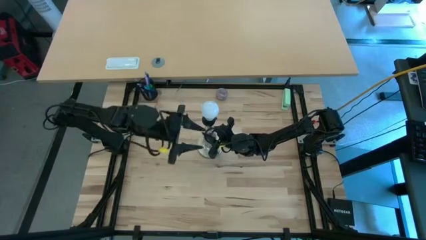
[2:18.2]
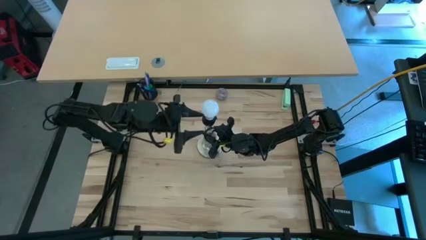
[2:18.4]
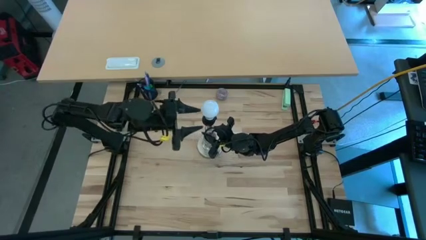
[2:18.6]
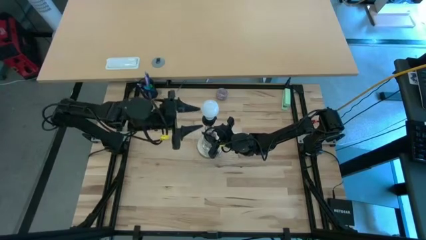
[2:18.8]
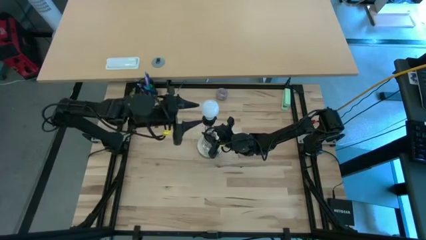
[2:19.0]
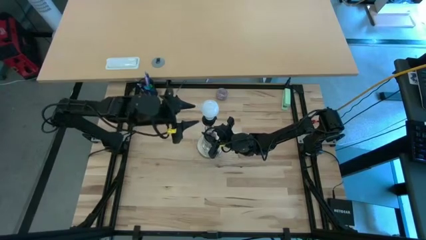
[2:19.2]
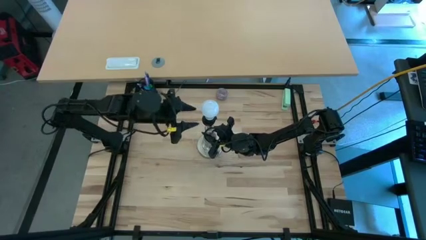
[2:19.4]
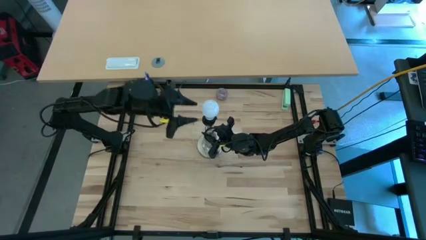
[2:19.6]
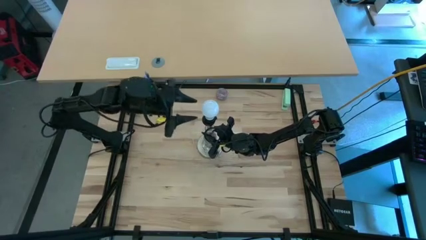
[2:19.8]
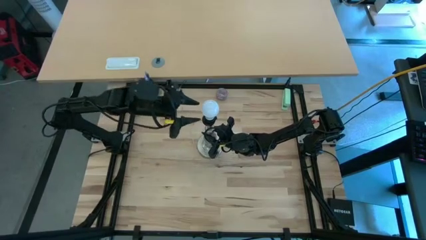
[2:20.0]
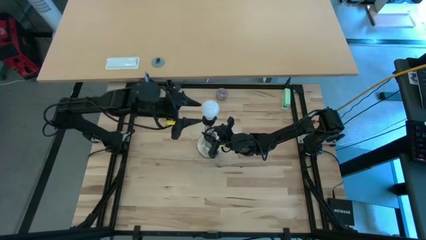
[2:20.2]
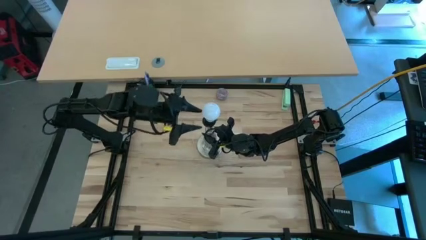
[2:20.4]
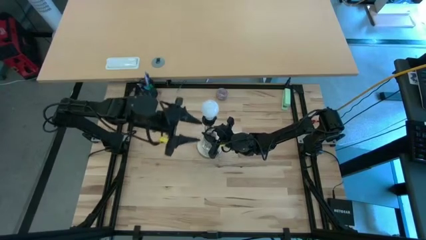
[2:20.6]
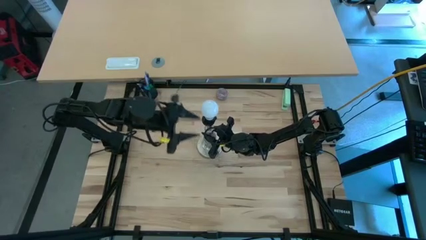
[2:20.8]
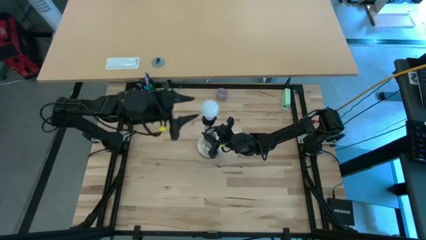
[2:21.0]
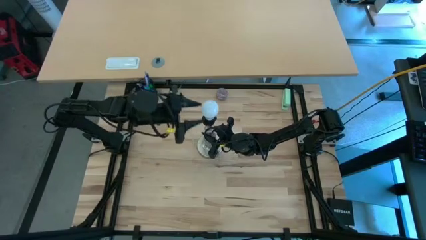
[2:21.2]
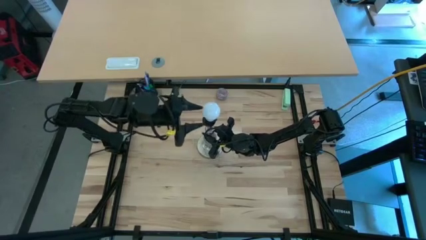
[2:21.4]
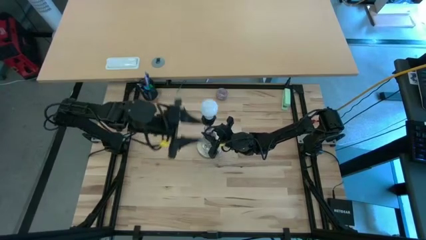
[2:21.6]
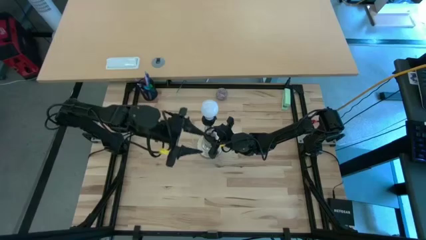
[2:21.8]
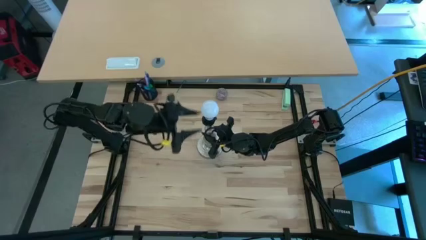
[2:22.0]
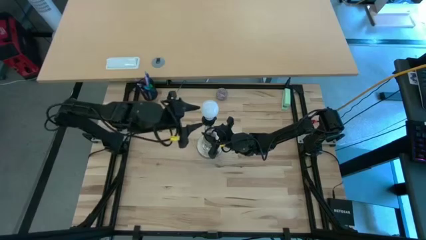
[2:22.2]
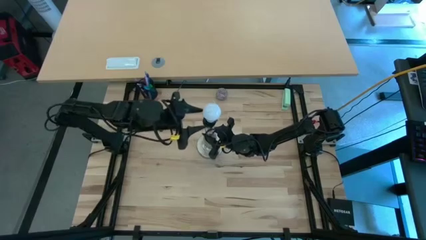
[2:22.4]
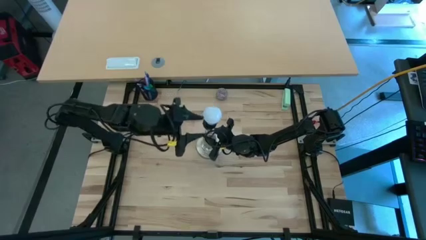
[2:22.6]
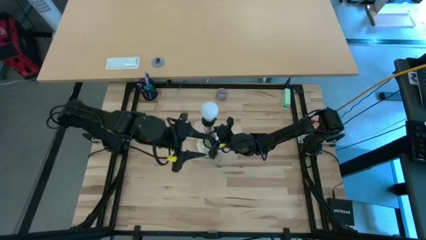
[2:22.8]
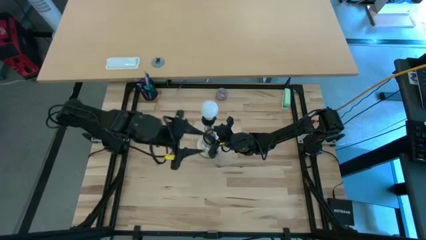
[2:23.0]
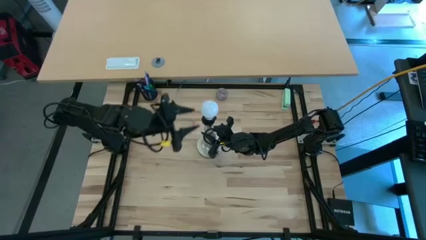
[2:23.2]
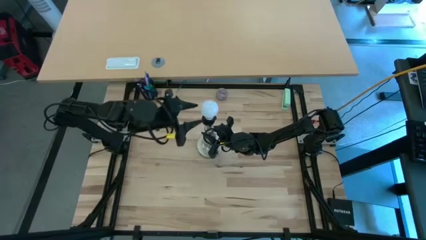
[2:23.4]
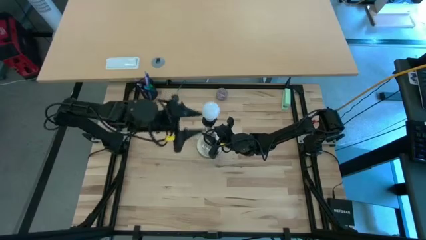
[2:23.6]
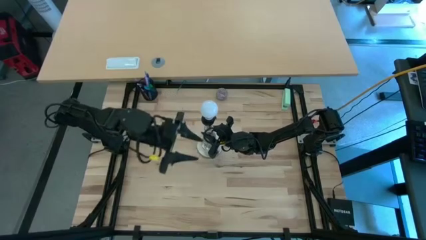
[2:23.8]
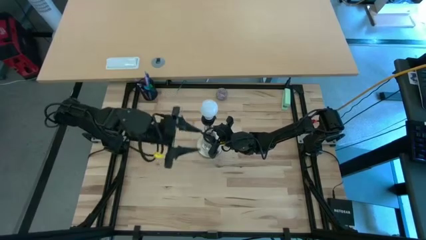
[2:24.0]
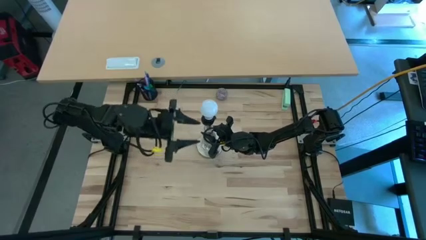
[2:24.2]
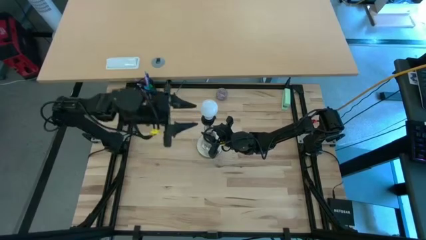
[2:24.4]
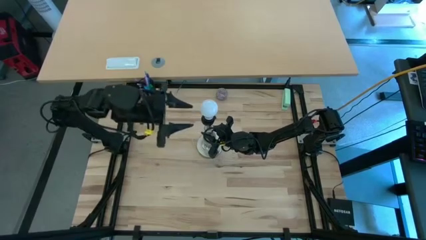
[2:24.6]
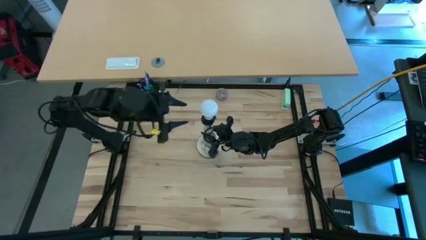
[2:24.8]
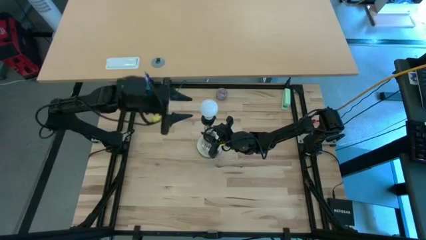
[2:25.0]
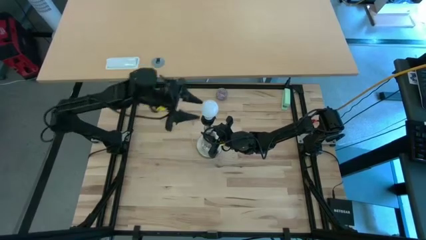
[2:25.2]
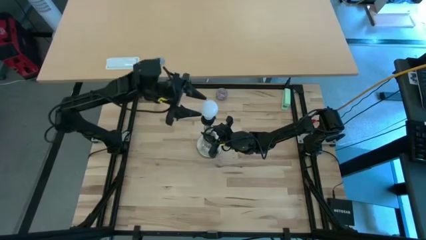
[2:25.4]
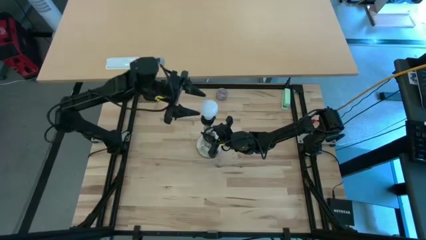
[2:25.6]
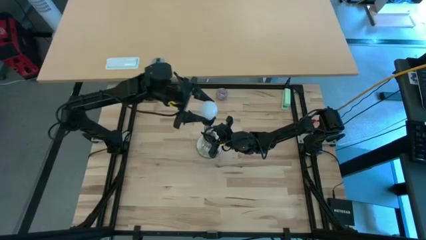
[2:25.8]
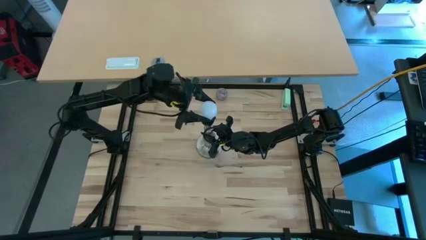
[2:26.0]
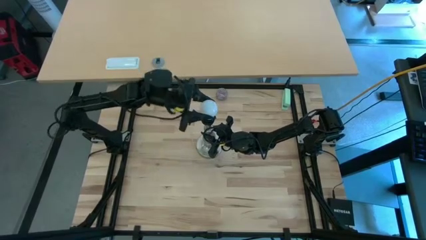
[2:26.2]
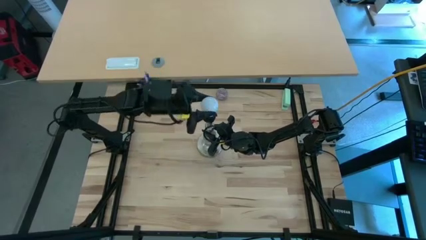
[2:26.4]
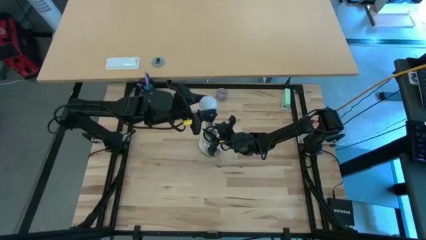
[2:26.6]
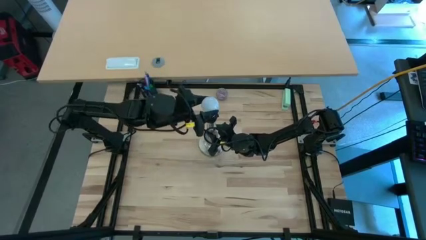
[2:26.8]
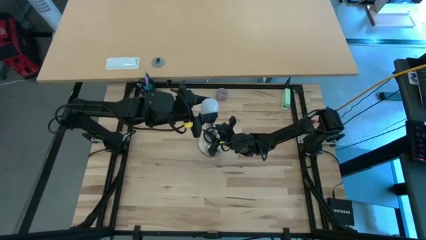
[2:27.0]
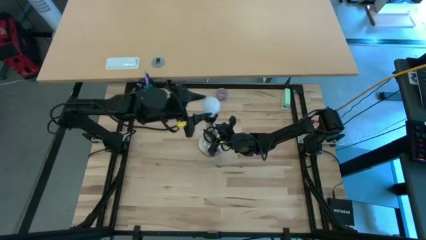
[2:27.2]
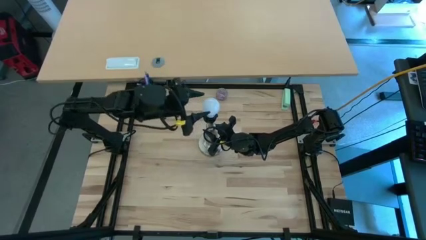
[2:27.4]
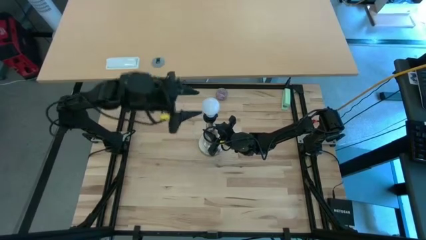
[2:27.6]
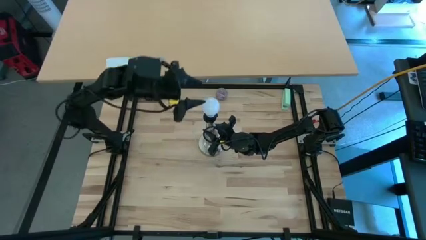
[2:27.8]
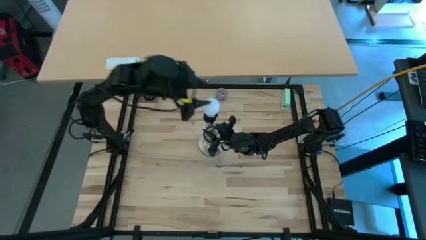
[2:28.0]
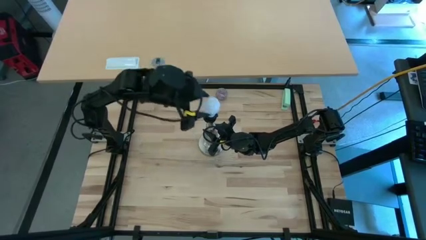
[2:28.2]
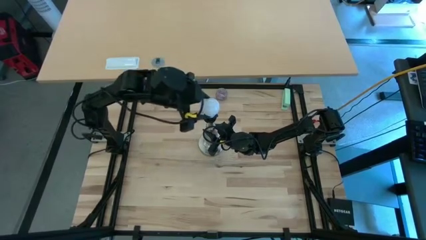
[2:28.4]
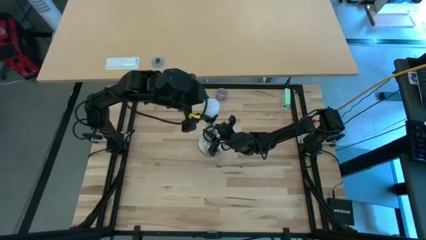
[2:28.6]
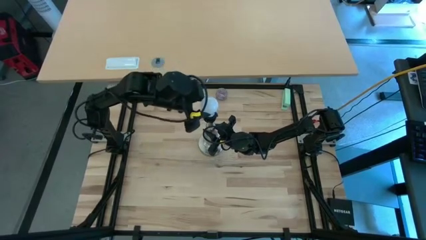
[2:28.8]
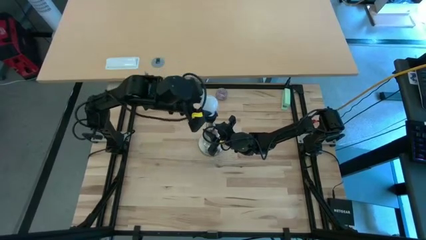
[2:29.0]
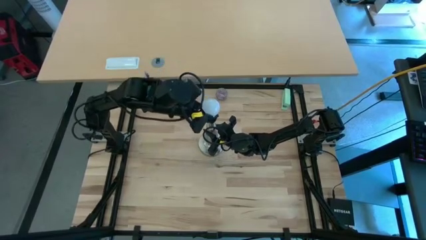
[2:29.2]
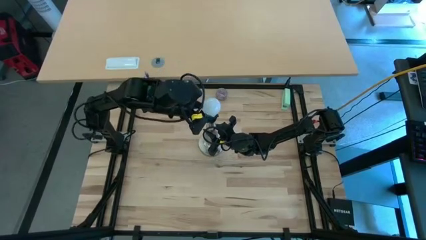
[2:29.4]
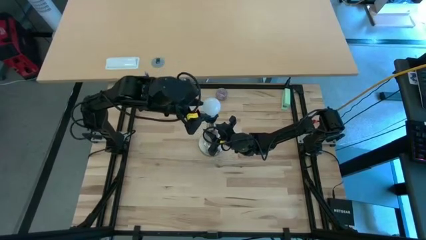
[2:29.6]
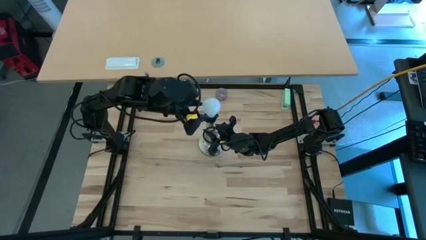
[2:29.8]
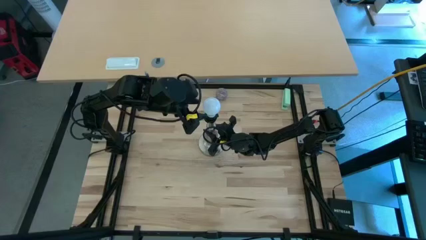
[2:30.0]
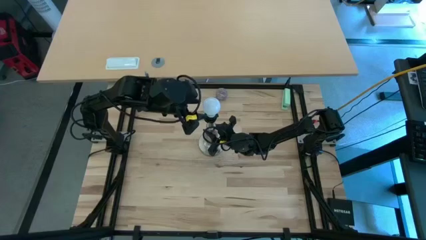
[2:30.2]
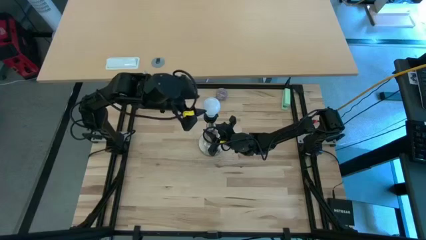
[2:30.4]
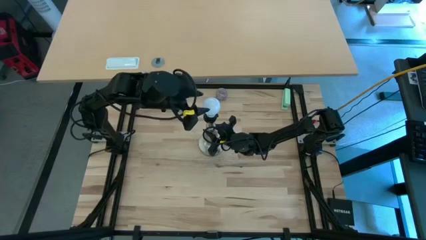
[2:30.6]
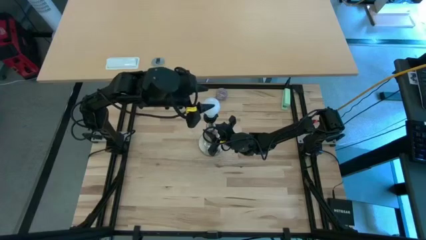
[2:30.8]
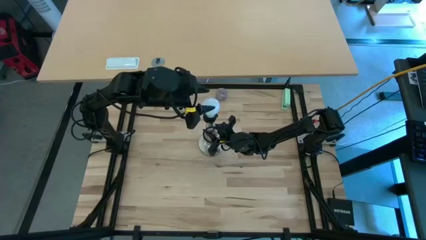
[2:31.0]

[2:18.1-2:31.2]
Task: Screw lightbulb
Remove the lightbulb from the silver lamp

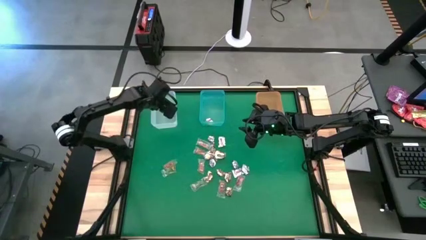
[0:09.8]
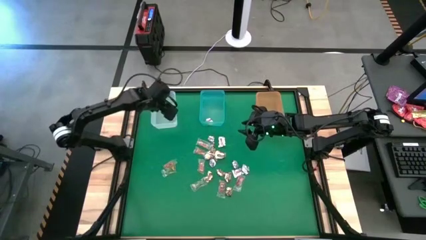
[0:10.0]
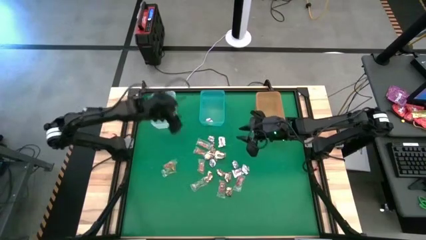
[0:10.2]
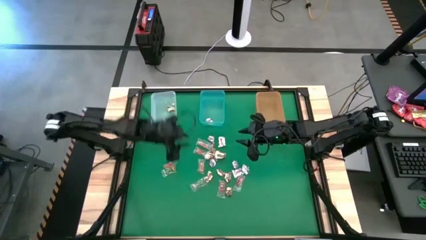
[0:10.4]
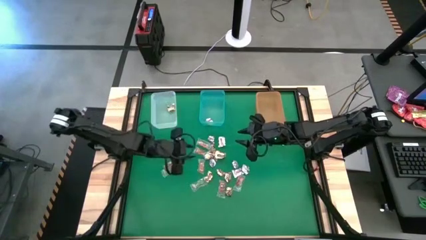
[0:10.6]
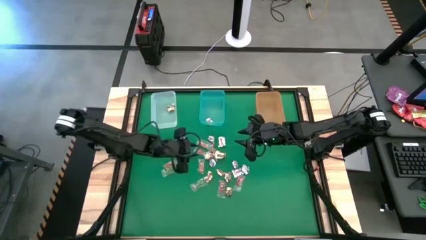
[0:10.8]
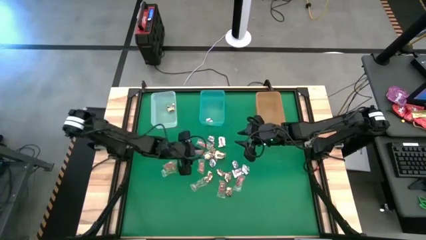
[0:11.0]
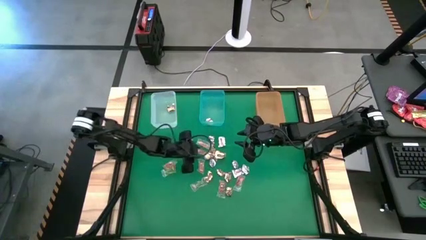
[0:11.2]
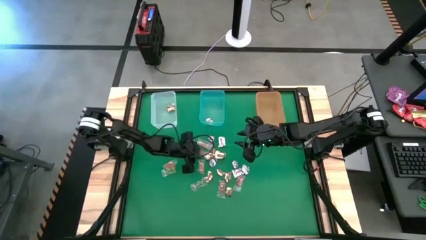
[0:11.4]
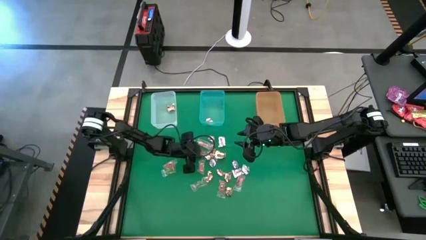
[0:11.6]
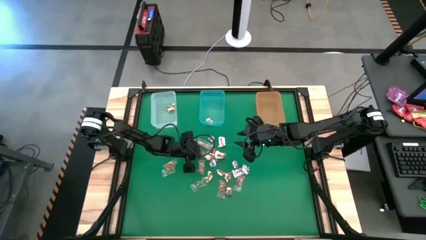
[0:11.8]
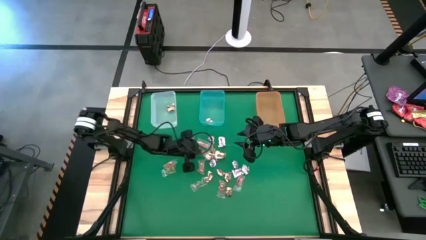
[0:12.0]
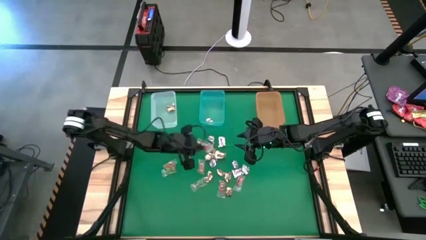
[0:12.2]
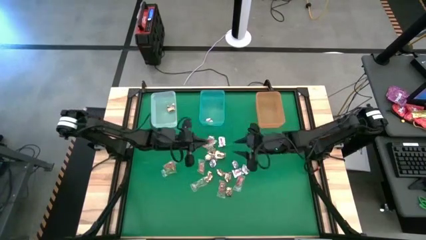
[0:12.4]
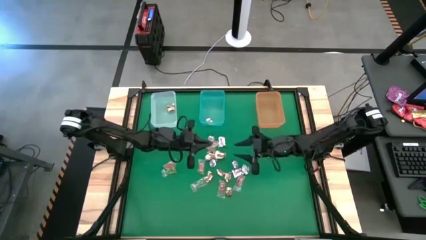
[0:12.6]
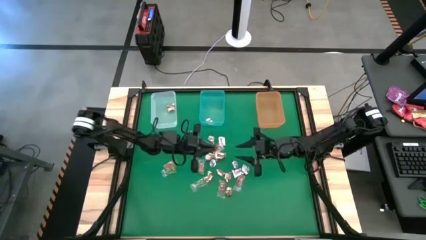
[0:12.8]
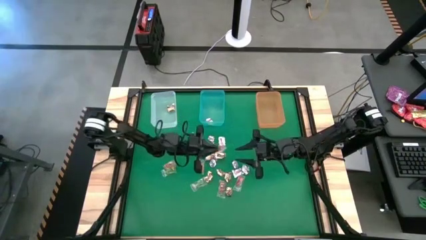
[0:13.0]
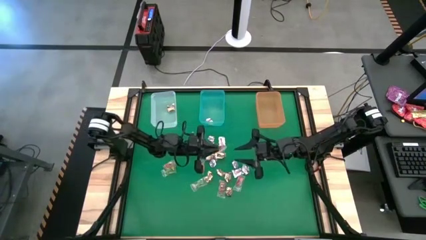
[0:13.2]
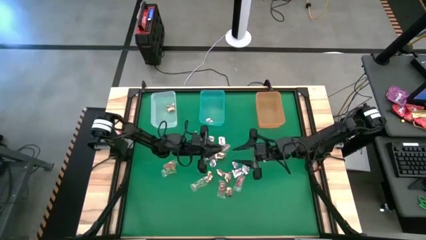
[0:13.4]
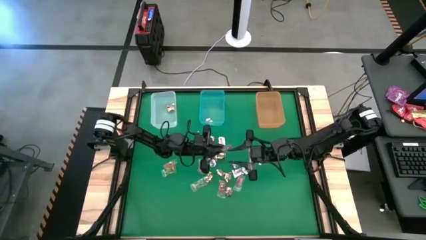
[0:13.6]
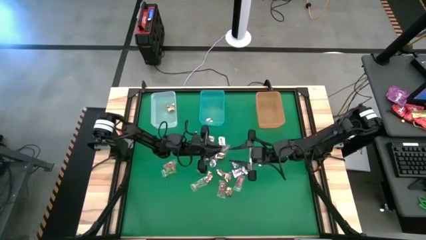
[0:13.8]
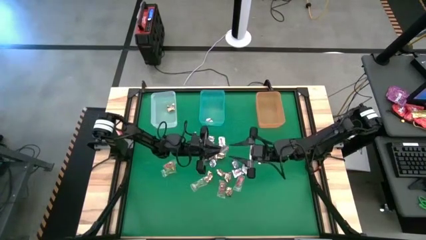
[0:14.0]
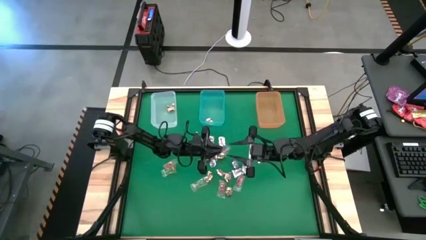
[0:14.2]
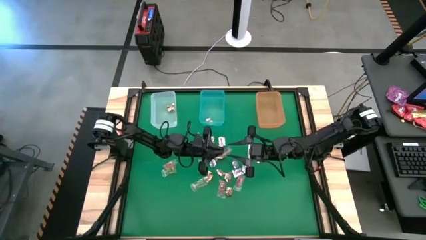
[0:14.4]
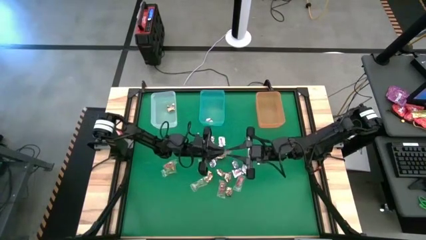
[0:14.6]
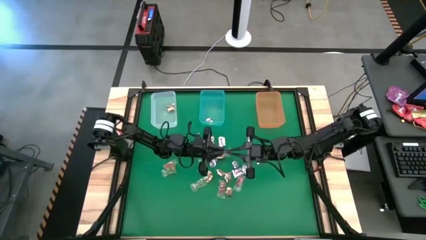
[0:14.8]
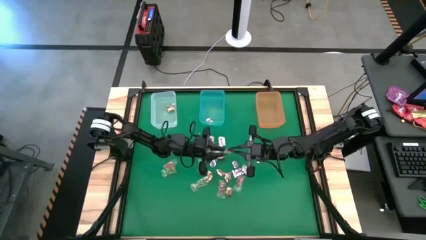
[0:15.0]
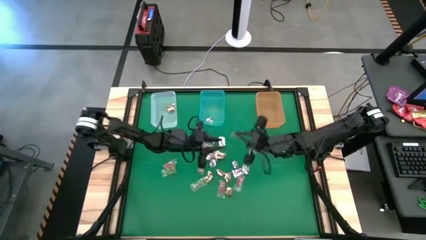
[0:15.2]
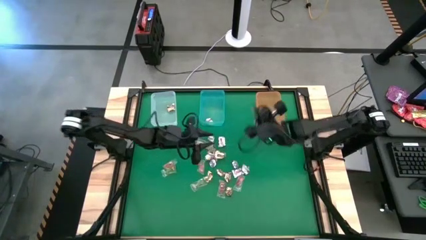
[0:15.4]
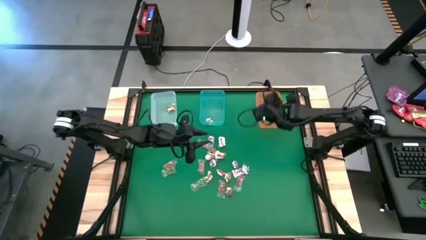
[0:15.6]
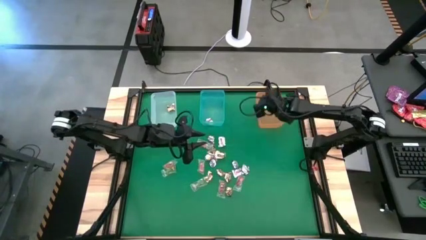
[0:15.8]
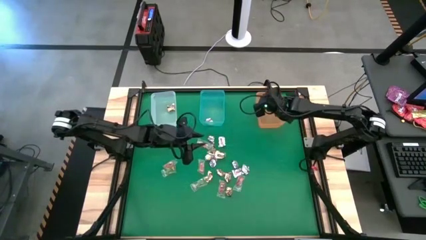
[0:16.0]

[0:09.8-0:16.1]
Task: Sort candy by brand, put in halloween buckets
Put the orange gummy into the orange bin
